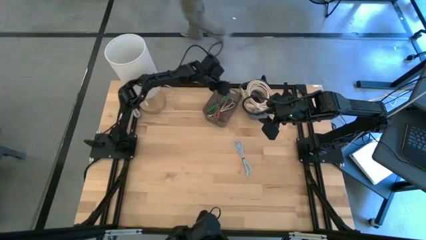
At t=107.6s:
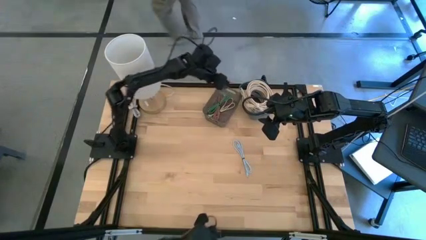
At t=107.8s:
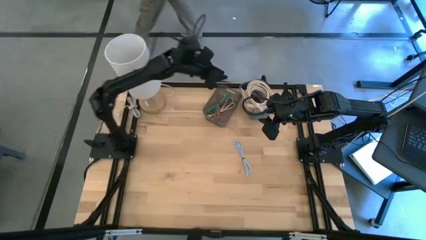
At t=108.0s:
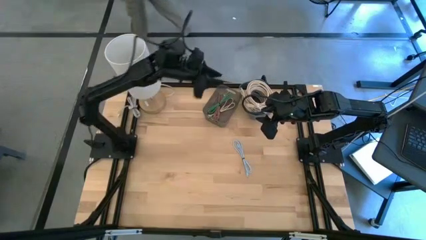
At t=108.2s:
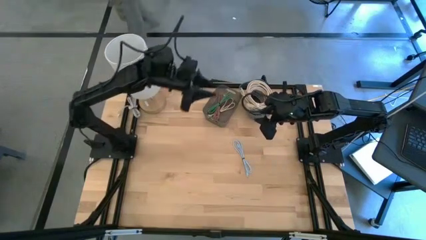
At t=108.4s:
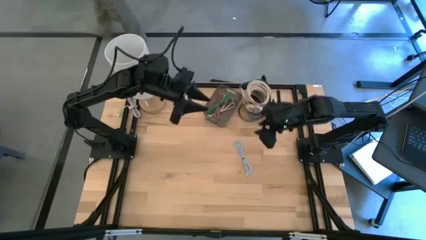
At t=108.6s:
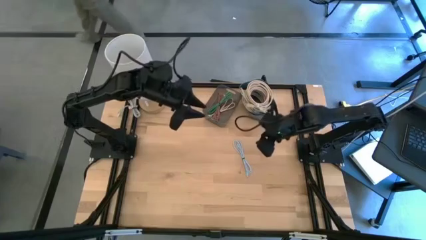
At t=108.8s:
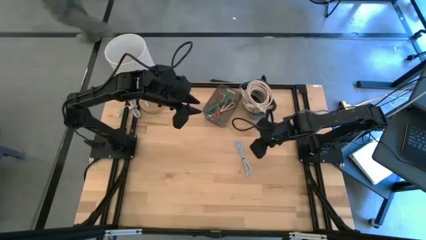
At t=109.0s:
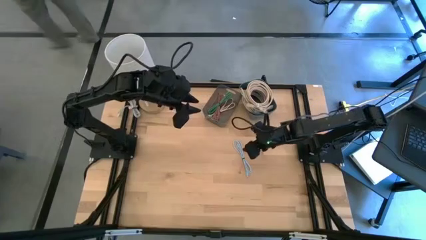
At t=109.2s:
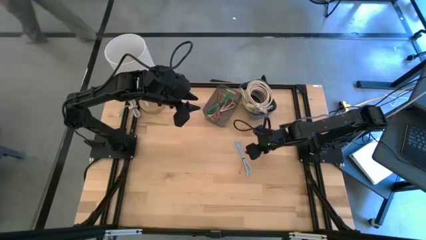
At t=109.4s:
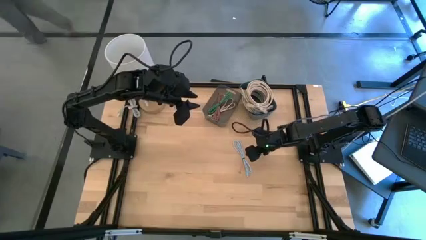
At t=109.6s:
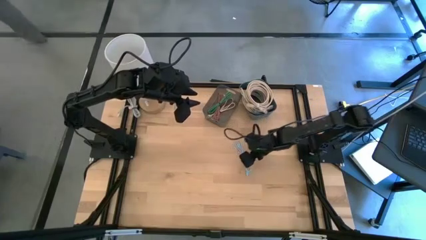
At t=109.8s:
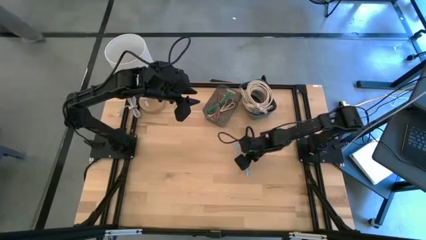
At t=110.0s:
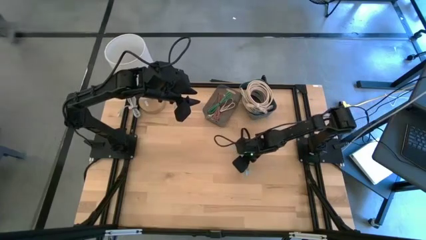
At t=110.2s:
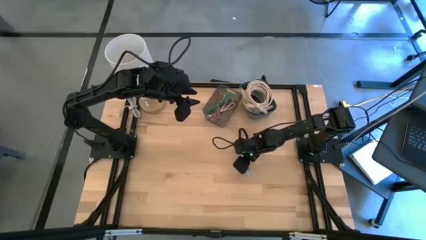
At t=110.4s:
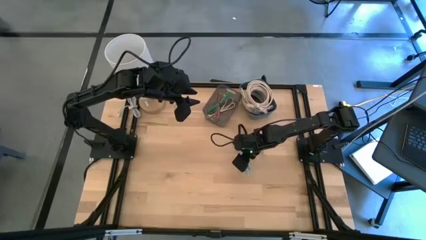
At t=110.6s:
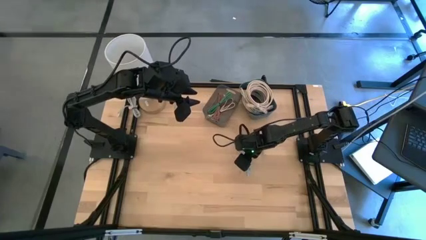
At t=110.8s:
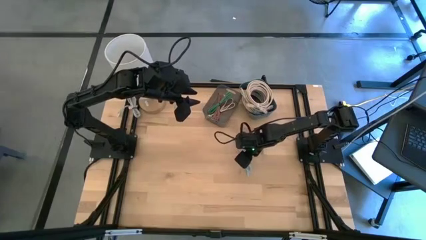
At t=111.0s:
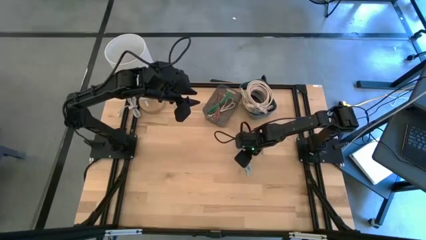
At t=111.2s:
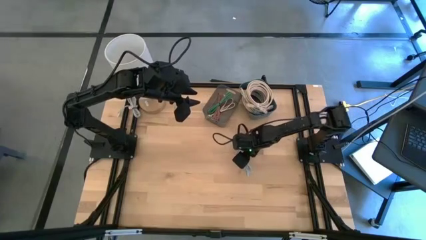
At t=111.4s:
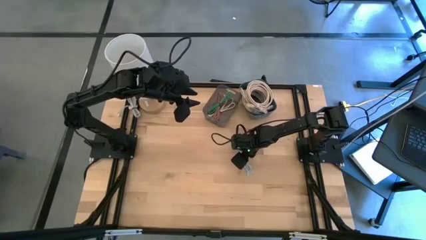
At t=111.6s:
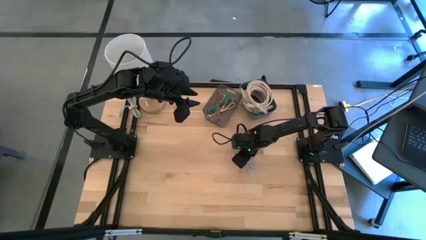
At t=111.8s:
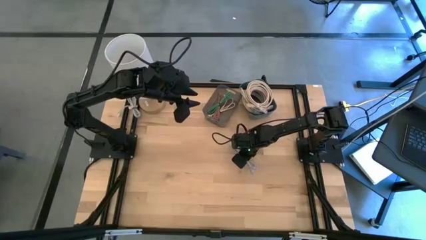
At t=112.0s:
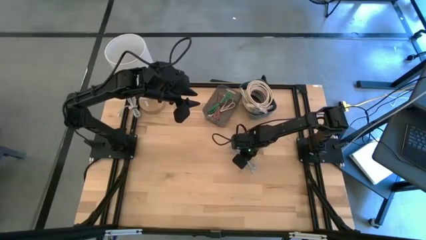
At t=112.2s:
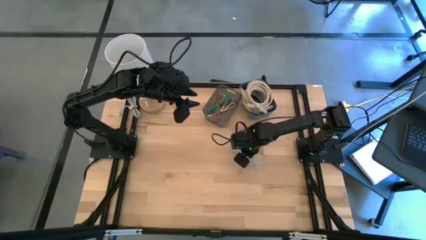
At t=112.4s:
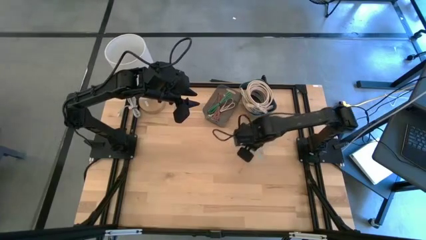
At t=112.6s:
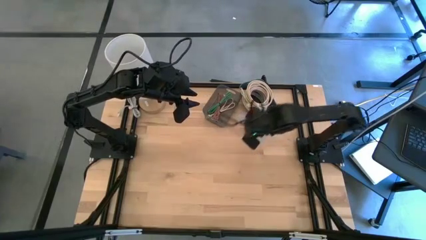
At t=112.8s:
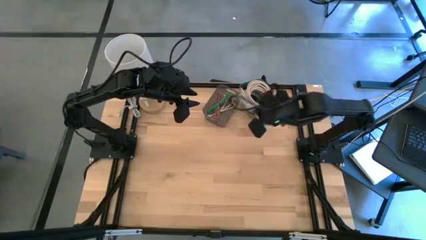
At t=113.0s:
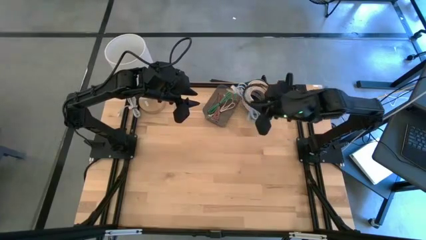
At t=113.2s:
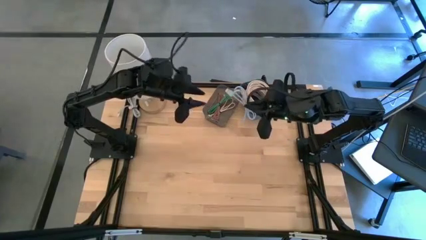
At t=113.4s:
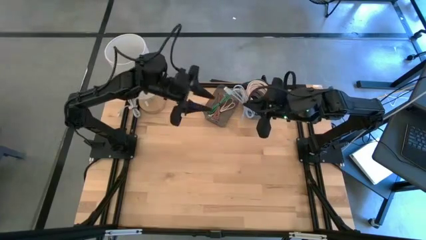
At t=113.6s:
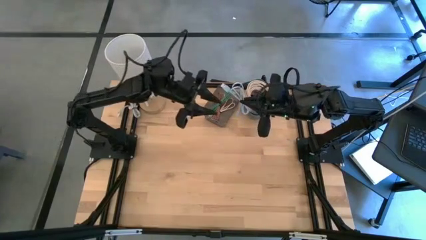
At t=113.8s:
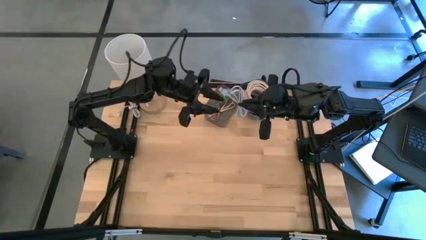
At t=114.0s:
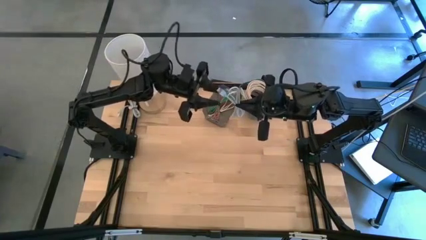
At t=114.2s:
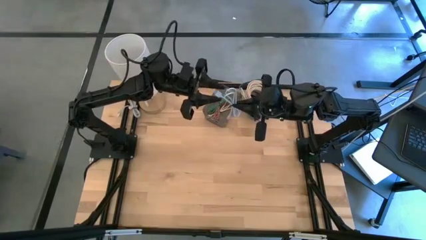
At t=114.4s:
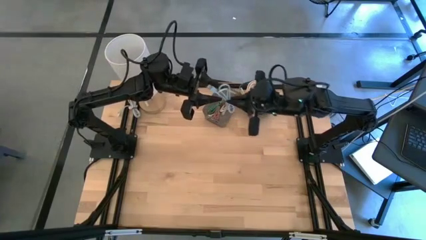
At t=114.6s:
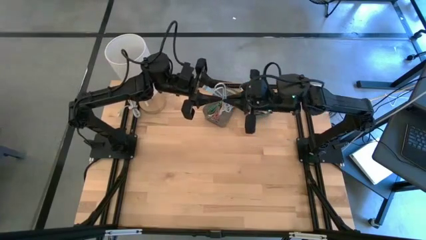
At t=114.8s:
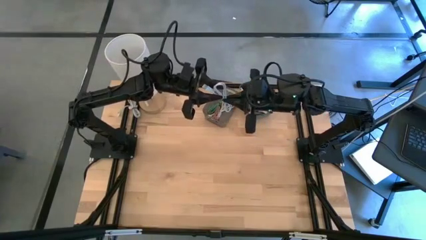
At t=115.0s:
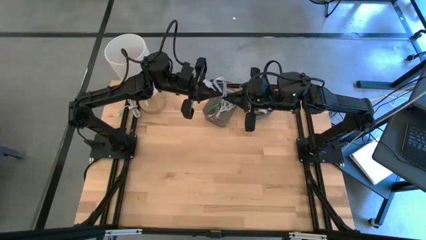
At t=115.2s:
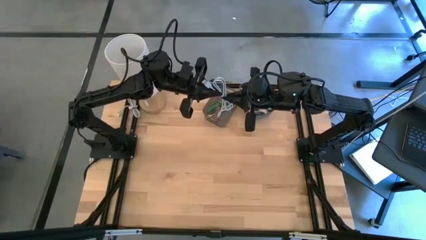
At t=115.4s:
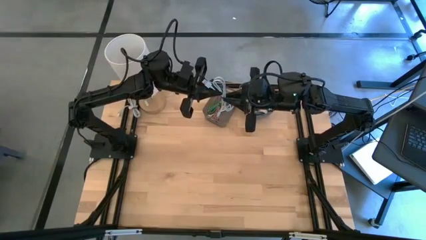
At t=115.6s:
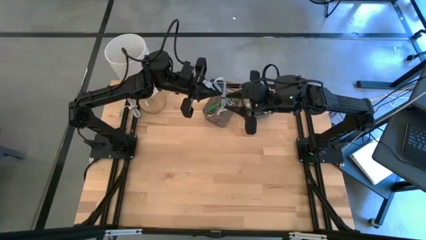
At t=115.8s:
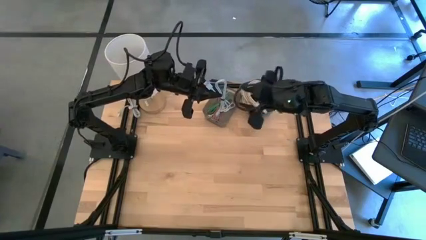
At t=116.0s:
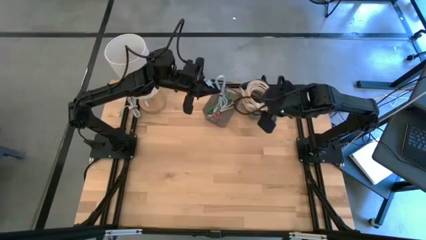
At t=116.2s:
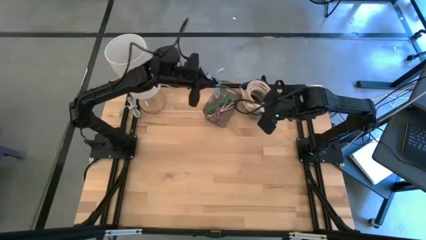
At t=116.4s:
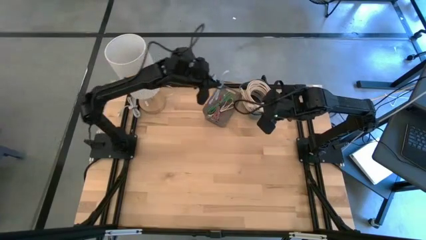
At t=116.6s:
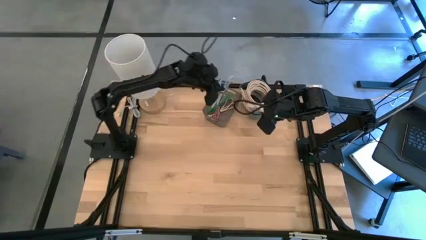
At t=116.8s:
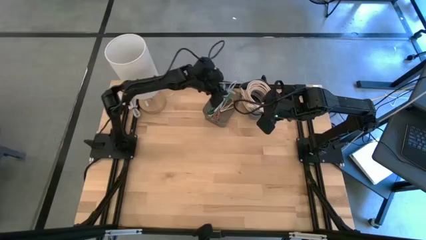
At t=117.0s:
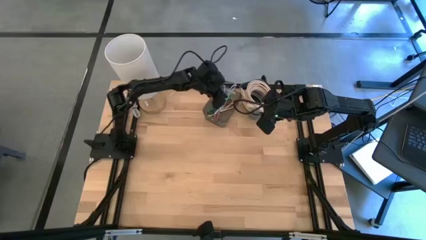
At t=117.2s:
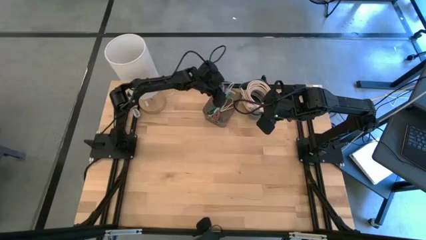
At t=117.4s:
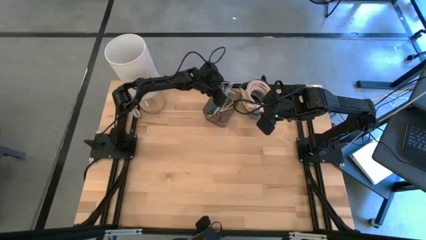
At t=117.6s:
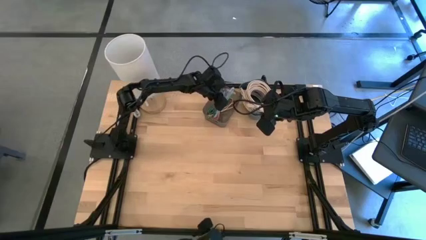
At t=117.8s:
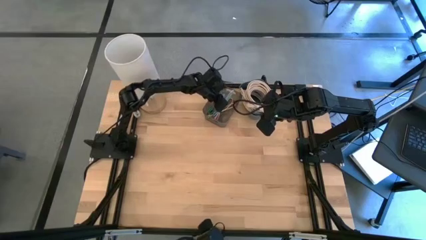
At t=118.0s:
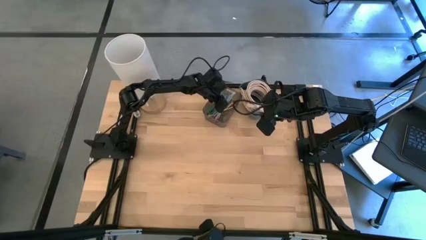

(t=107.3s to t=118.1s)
Put the light blue charger cable into the black transparent bin

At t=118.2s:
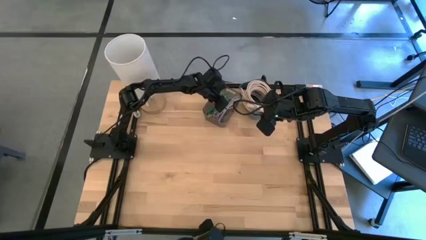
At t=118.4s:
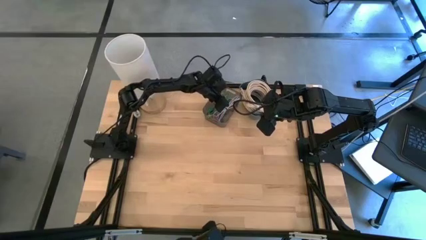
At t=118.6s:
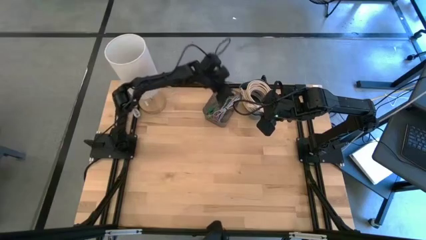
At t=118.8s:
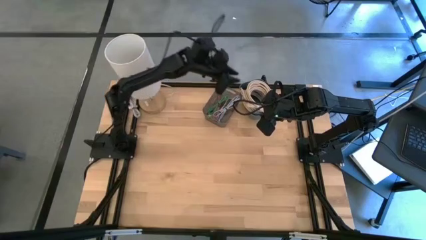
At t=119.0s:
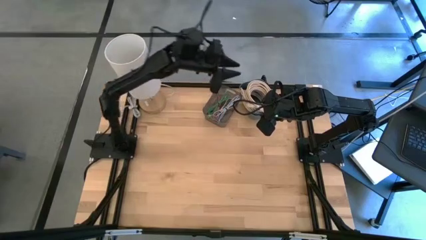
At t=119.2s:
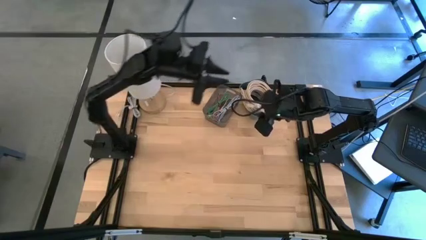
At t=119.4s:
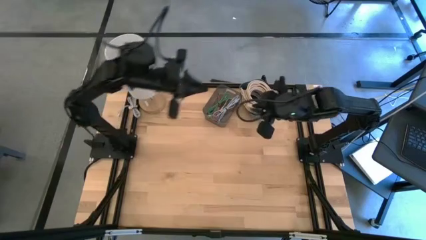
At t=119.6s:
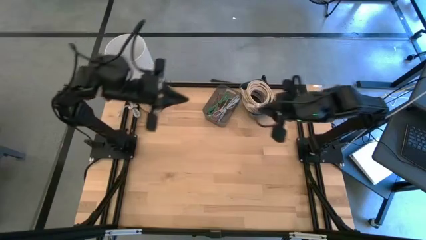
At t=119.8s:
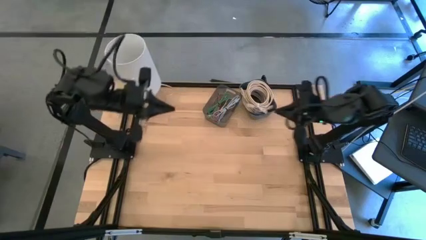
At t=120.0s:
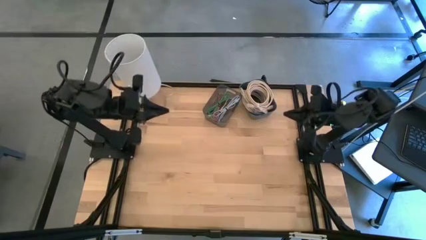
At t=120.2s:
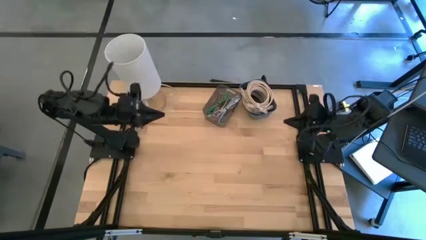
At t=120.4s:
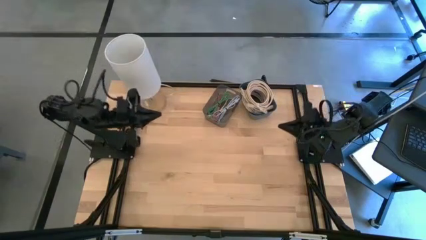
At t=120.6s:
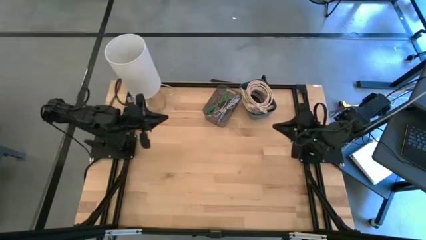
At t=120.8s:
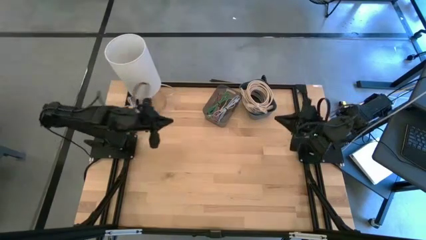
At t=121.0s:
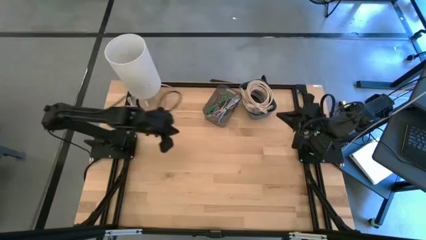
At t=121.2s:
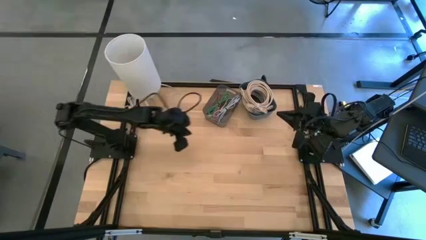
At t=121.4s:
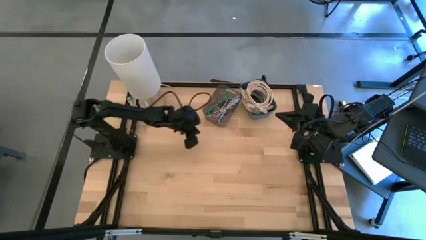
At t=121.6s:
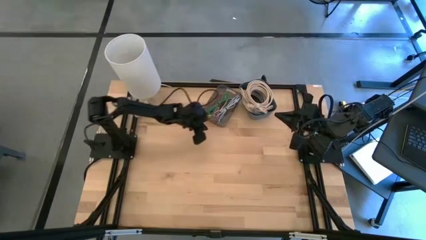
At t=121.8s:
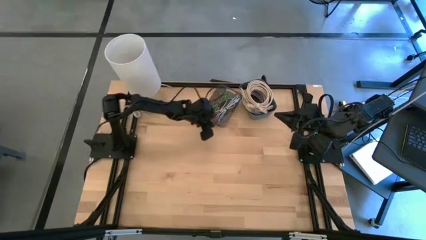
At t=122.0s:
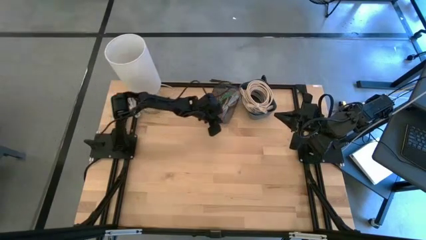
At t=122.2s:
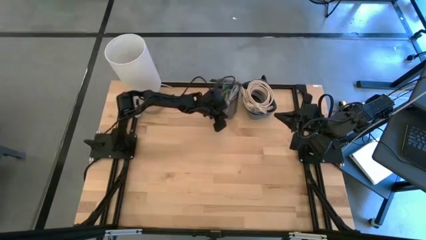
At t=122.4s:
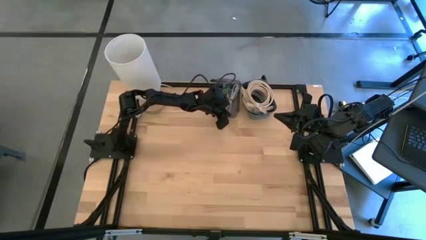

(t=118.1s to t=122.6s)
Adjust the black transparent bin

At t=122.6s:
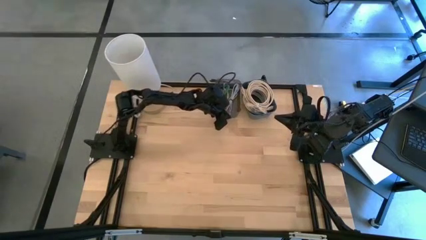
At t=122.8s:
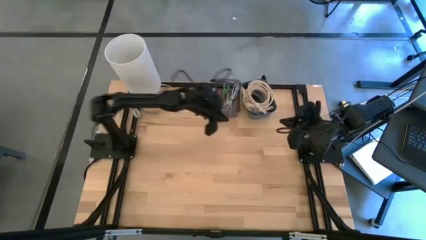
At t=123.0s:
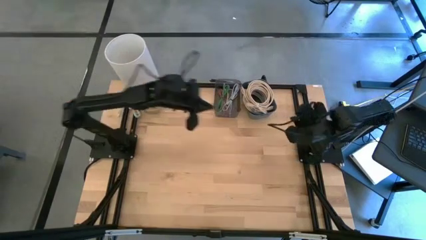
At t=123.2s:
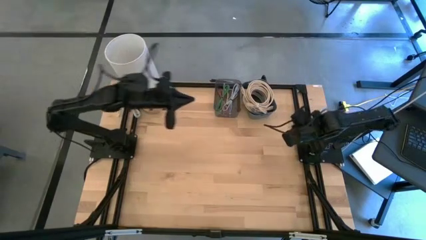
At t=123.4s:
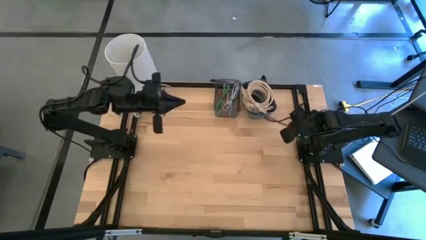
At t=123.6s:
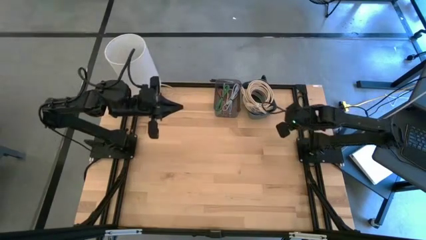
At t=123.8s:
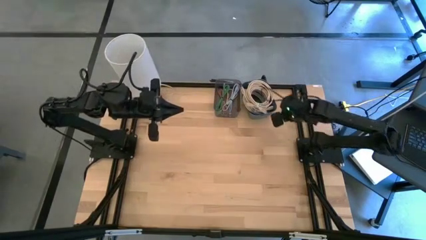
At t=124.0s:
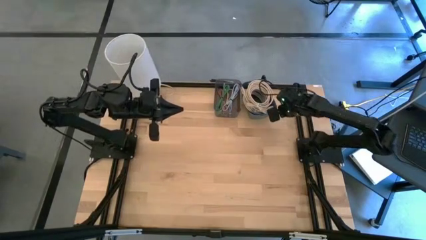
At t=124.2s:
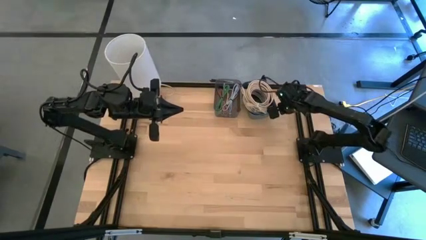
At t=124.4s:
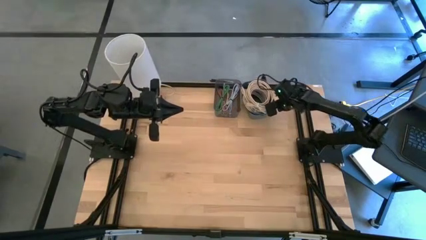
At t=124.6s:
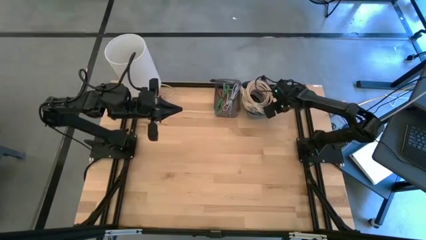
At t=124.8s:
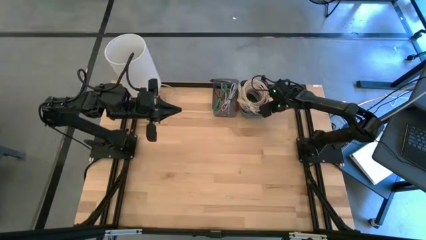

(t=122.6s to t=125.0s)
Adjust the blue bin
